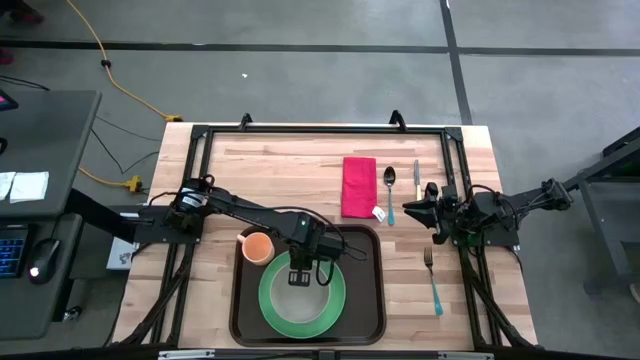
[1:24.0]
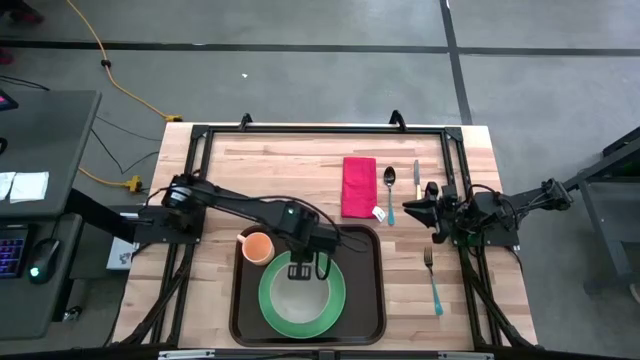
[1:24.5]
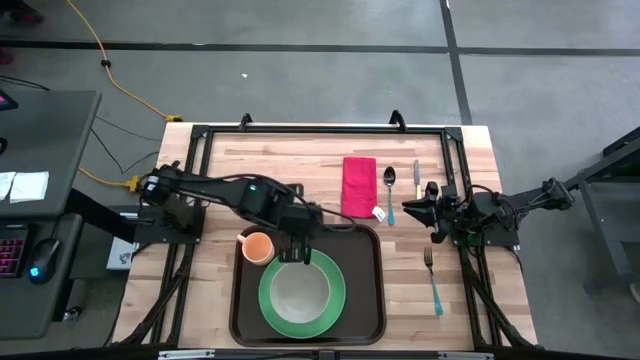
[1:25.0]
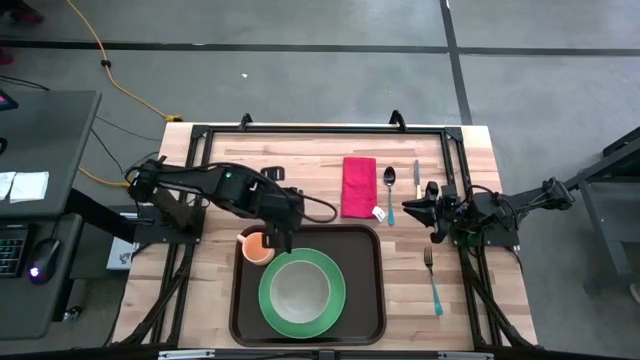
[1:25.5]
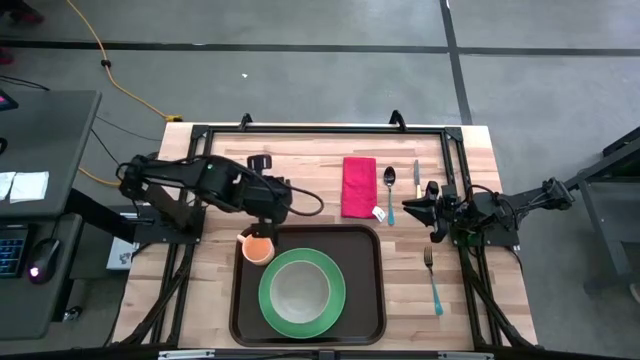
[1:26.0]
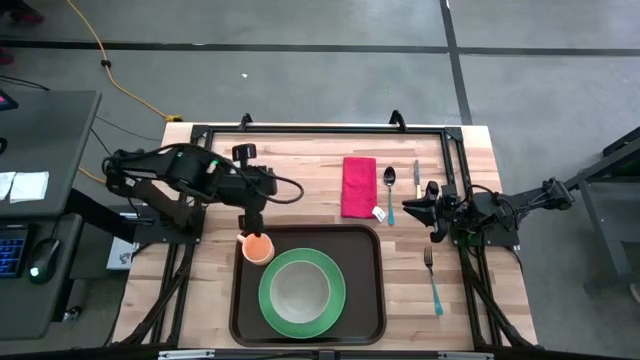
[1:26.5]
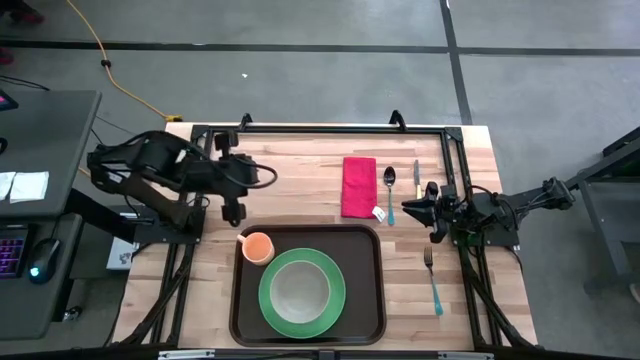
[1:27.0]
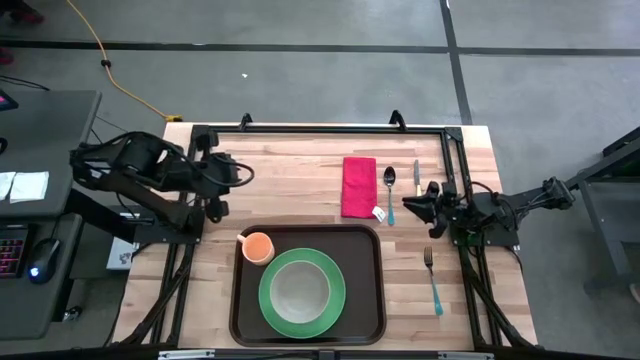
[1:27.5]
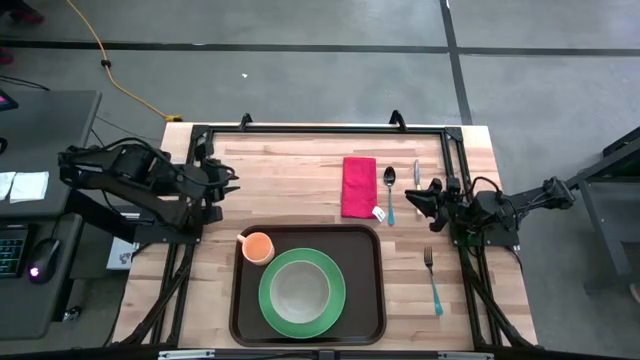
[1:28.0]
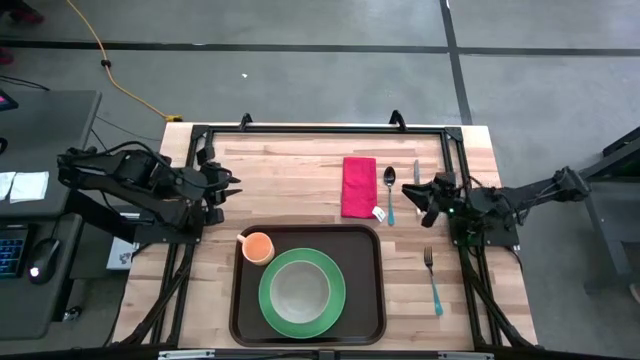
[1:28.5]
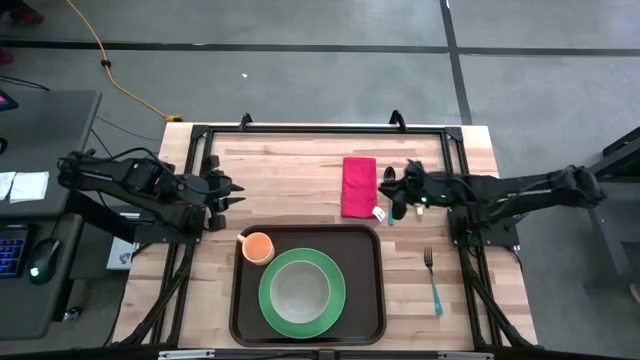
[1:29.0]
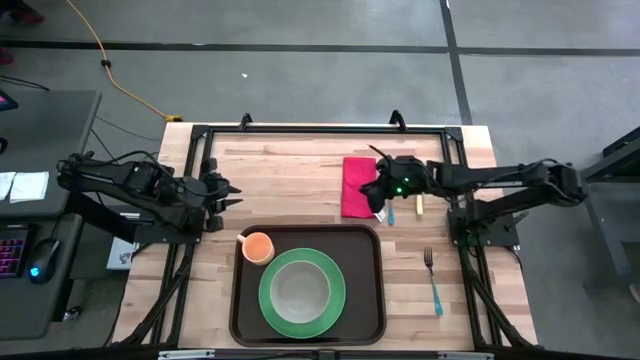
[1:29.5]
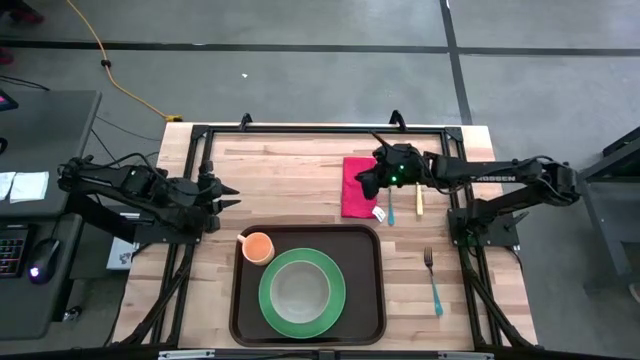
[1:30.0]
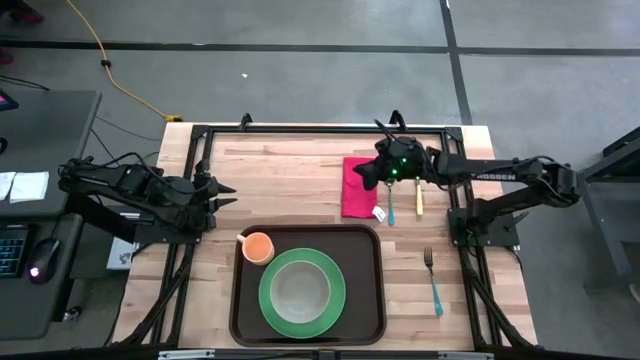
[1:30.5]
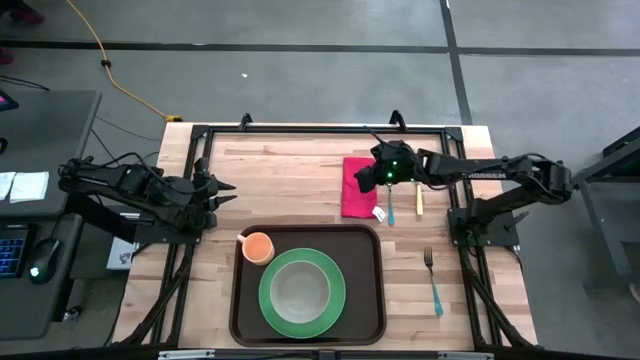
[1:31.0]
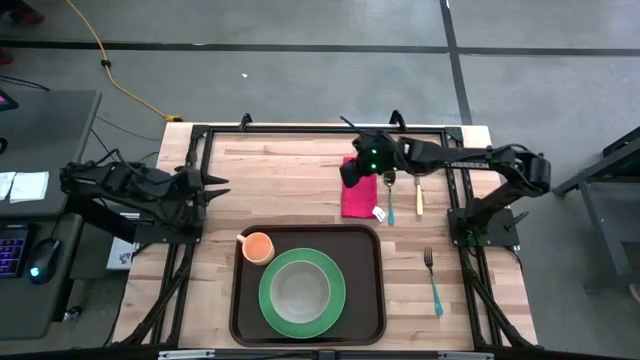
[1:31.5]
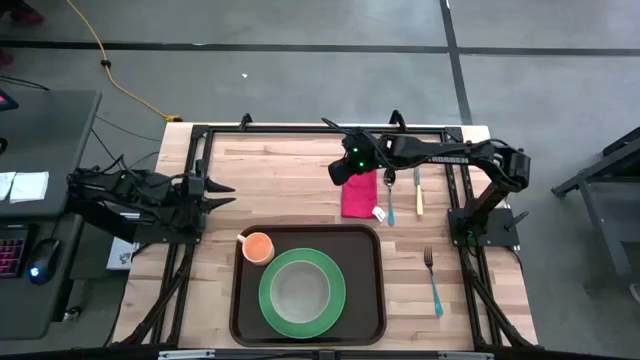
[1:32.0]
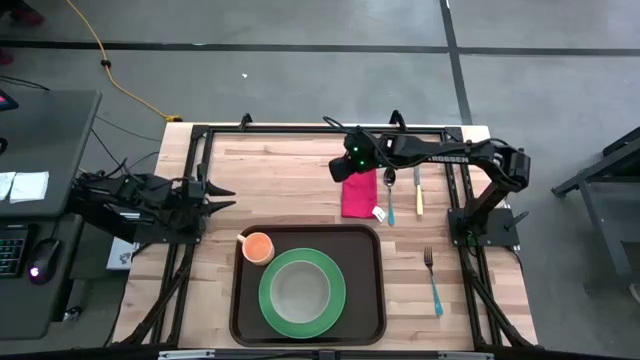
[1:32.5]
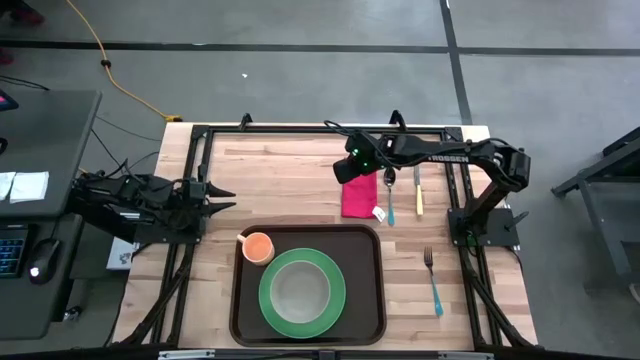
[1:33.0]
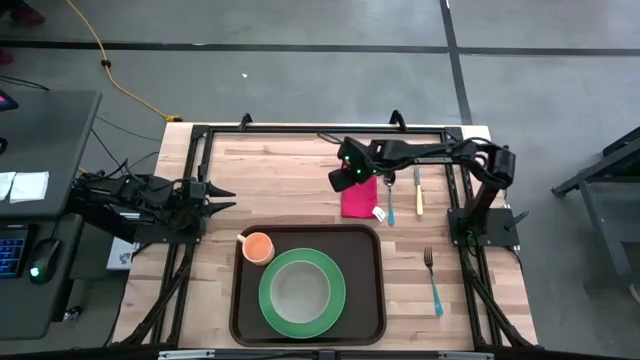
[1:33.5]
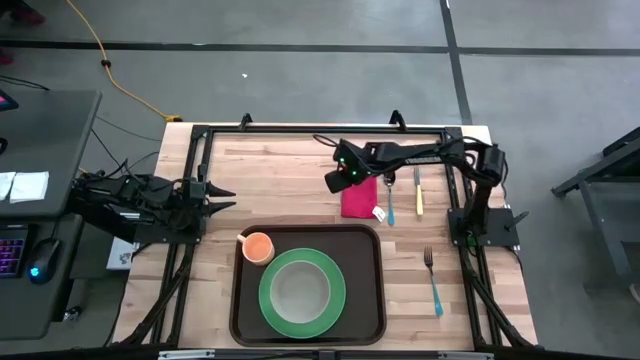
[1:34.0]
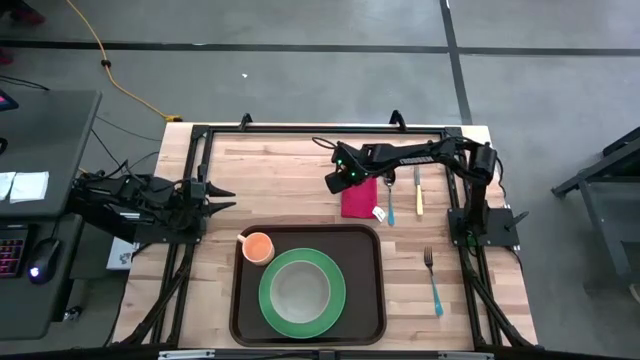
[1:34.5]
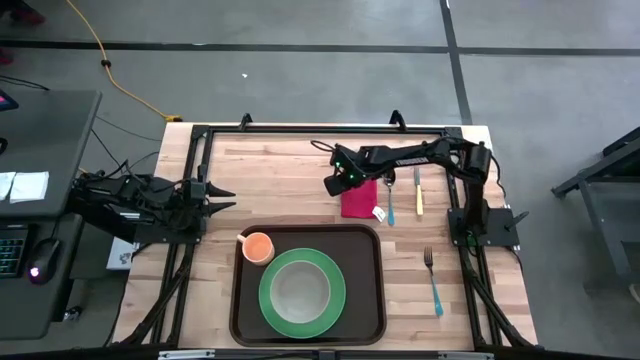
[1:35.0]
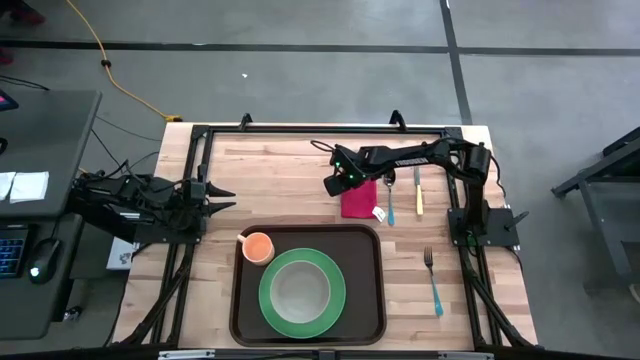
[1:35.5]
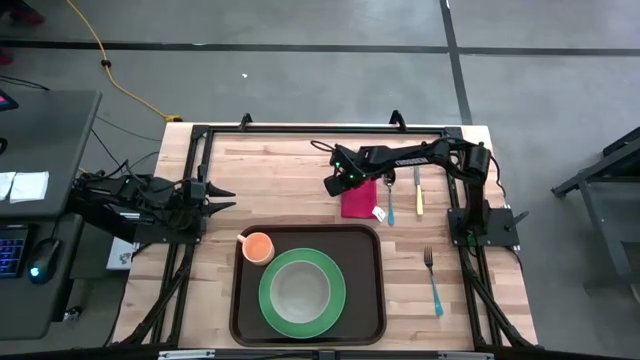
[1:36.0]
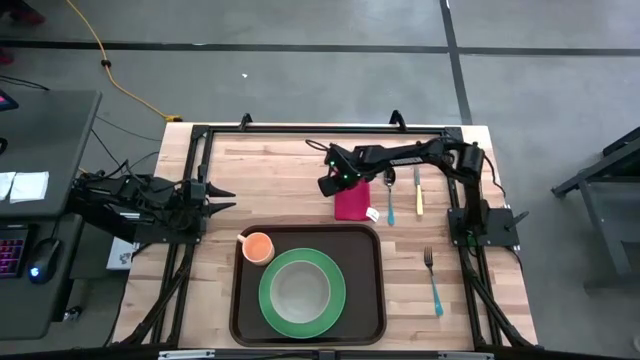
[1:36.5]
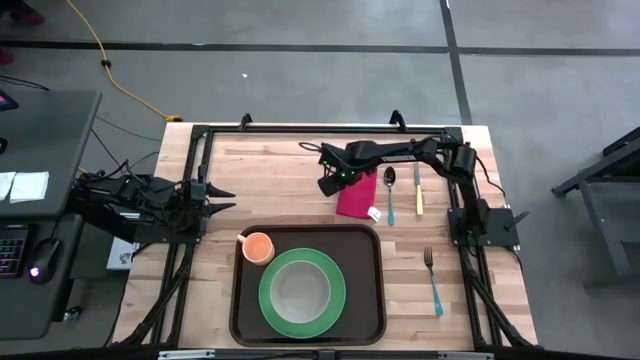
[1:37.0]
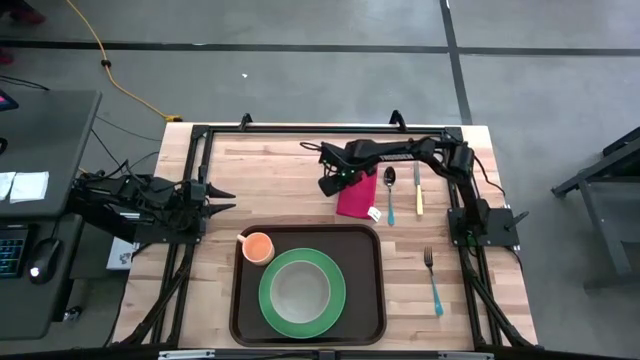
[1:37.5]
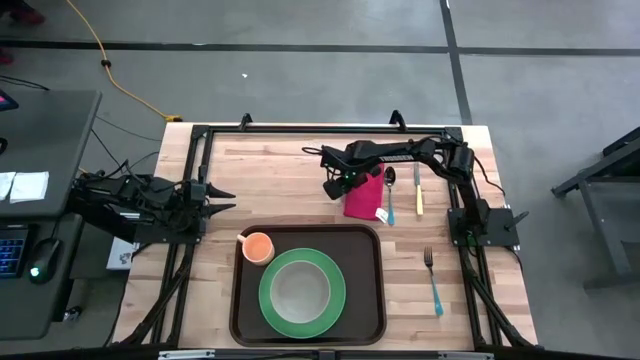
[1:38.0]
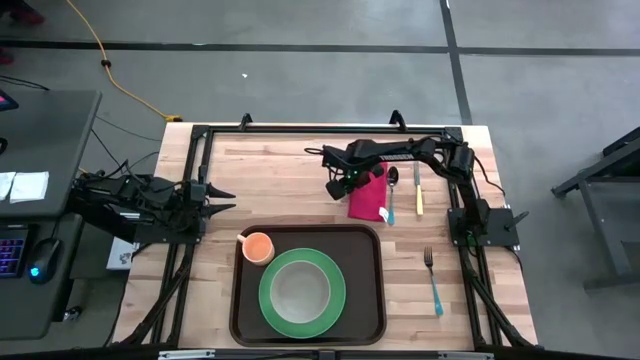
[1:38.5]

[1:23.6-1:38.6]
Task: Set up tray
Put the red napkin on the brown serving tray

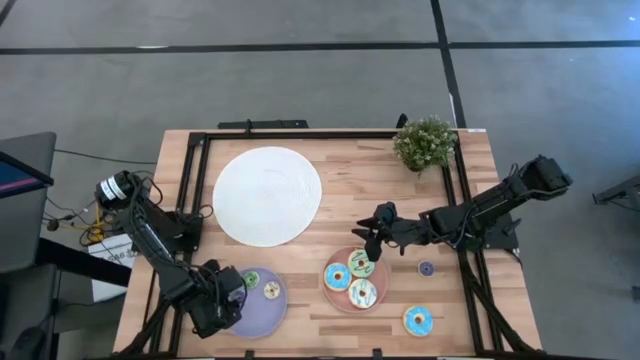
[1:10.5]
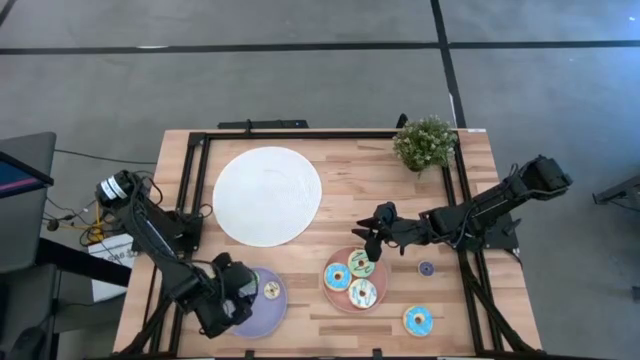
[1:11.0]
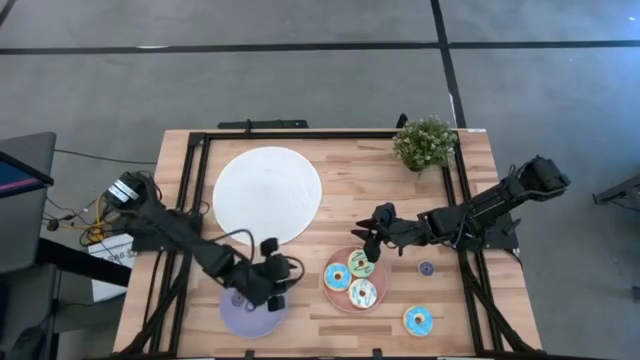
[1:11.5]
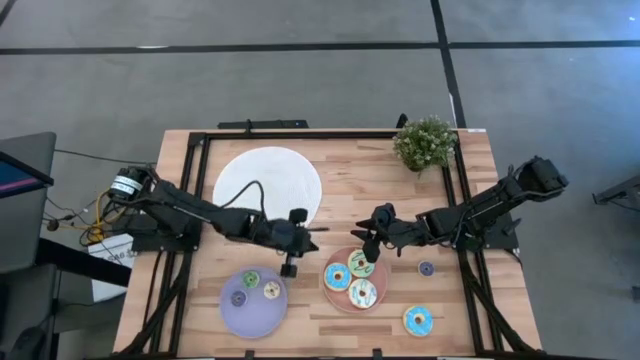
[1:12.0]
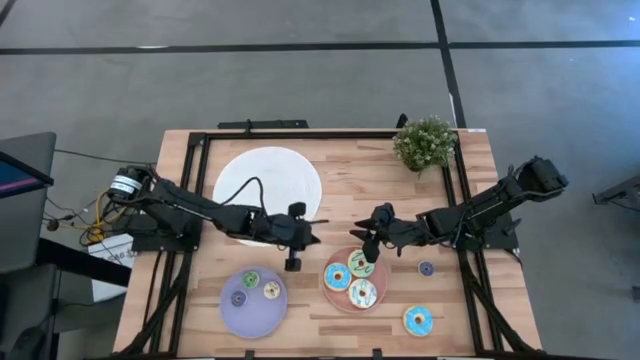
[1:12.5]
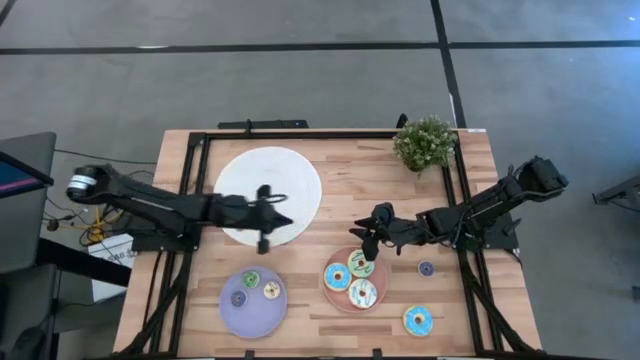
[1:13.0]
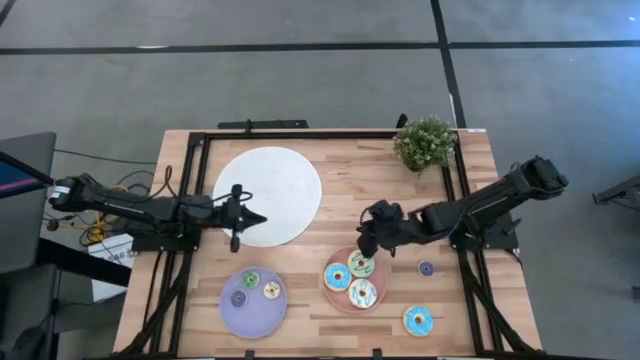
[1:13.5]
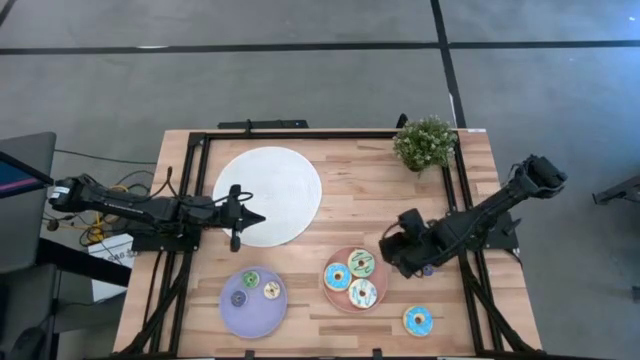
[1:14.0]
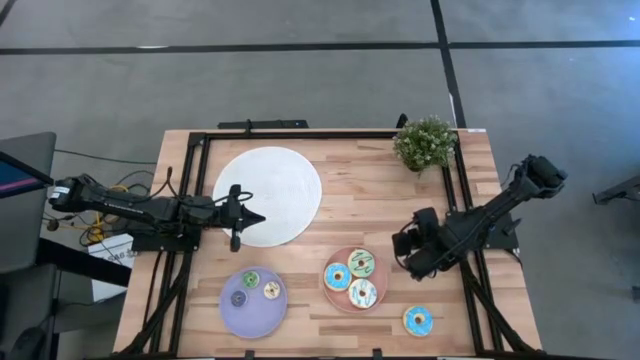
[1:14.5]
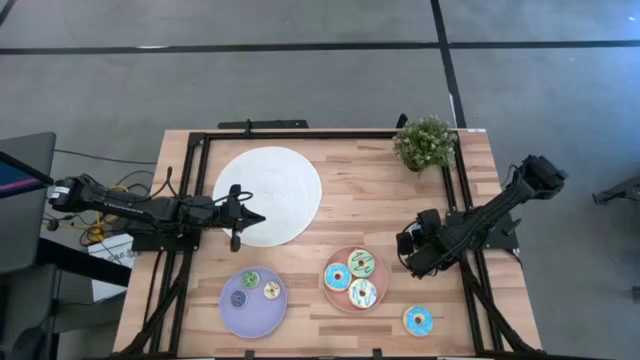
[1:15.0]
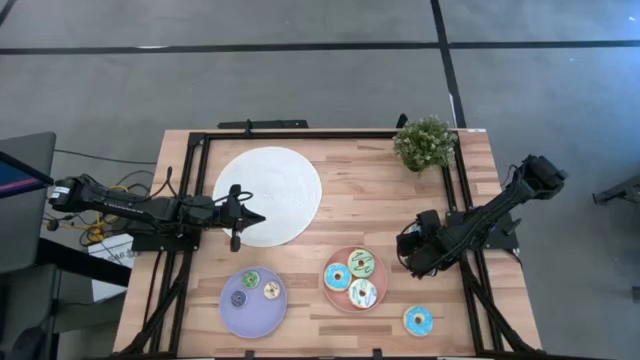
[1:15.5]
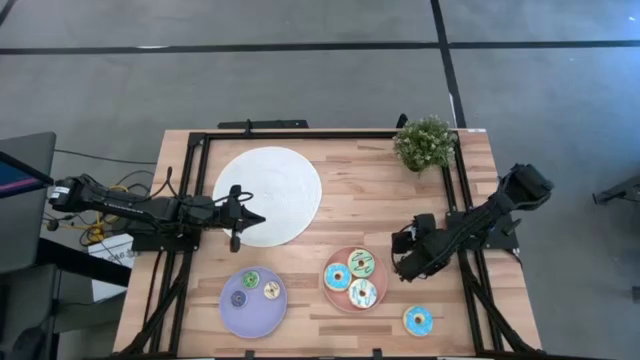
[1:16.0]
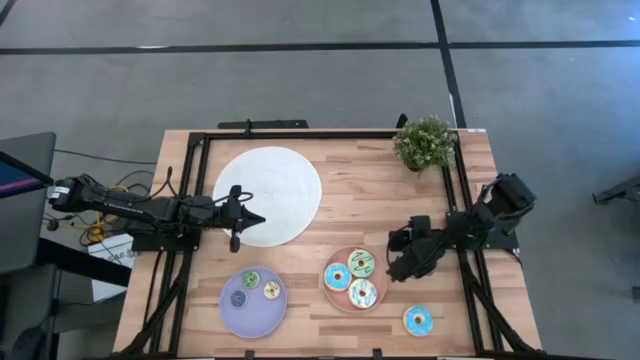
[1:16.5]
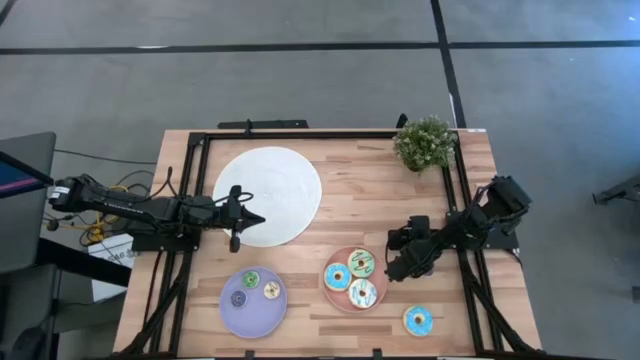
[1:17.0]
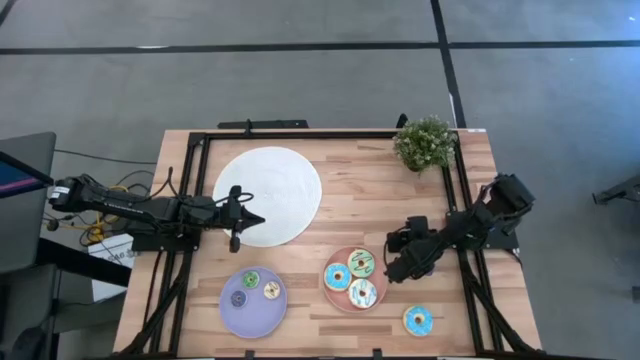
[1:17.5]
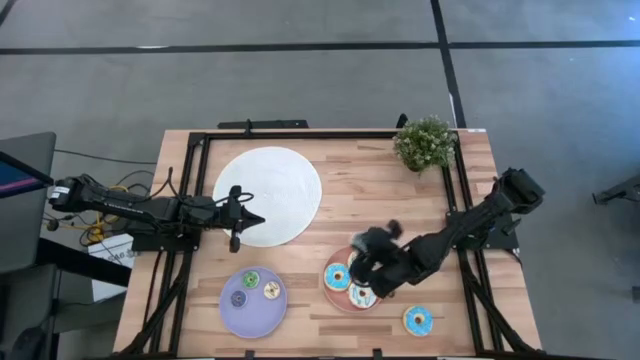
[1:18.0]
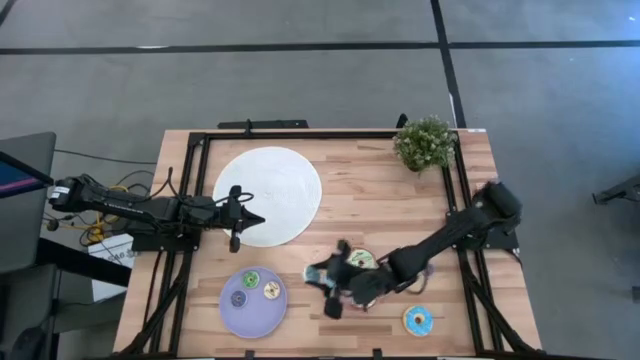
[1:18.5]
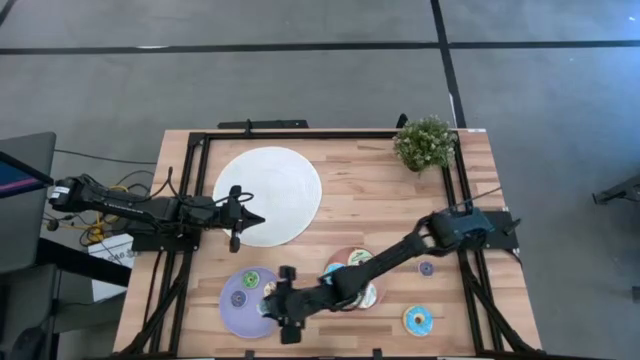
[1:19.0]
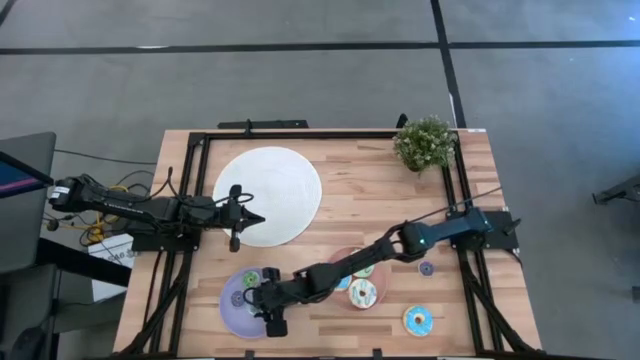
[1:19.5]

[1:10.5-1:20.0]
Task: Pick & Place donuts
Put the small light blue donut on the purple plate
